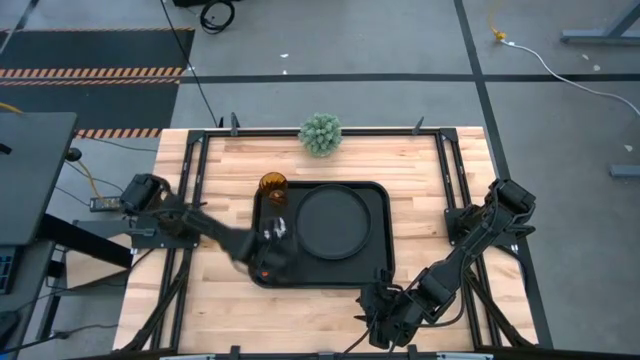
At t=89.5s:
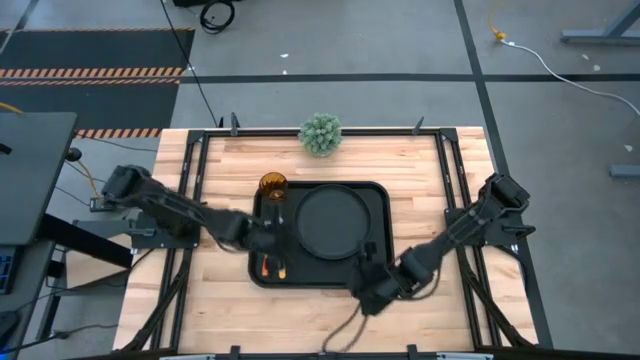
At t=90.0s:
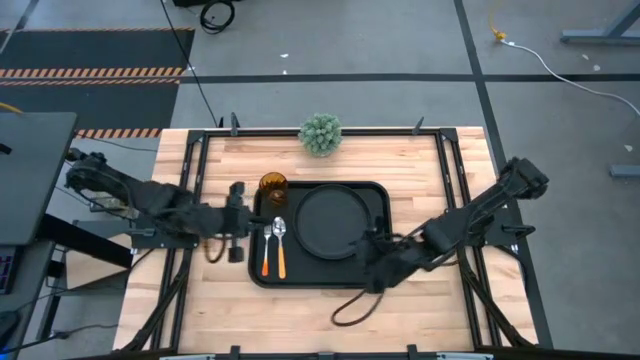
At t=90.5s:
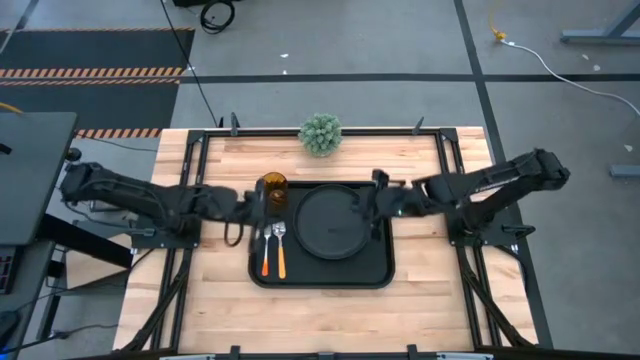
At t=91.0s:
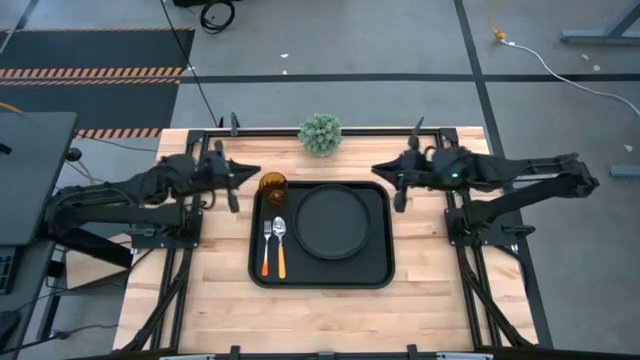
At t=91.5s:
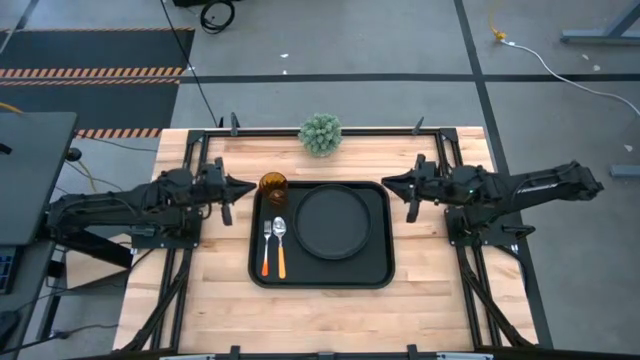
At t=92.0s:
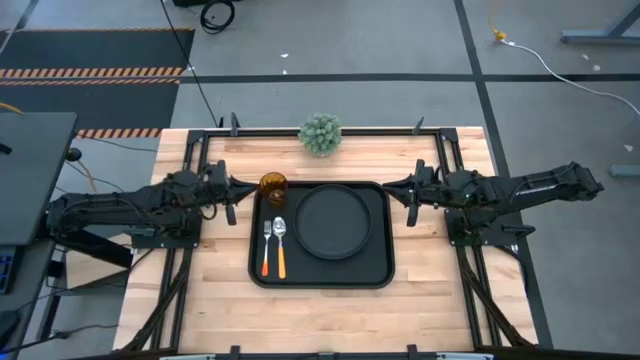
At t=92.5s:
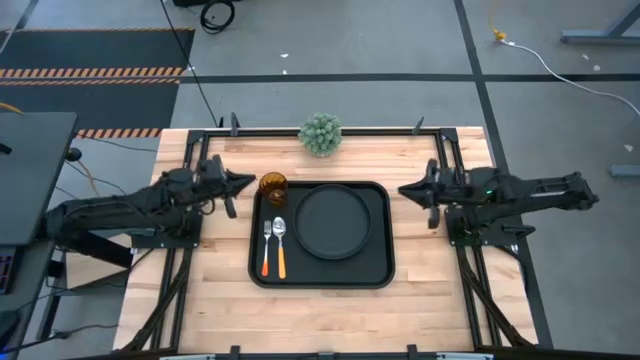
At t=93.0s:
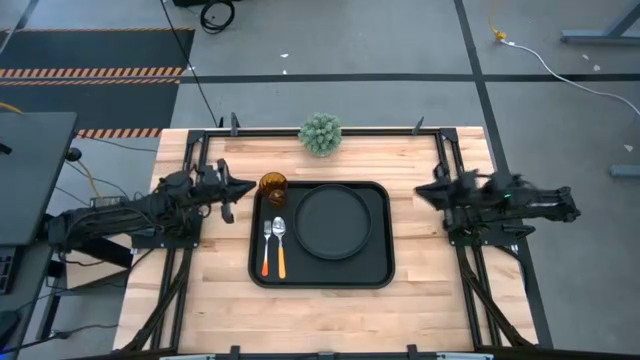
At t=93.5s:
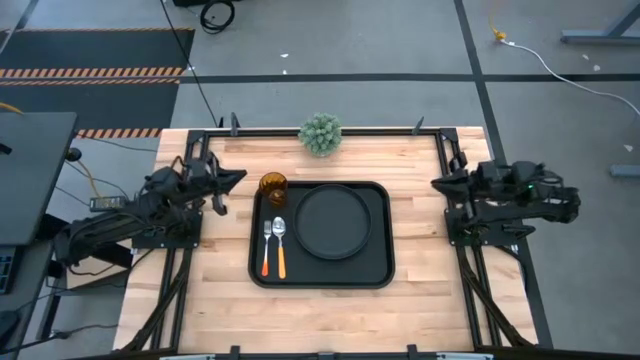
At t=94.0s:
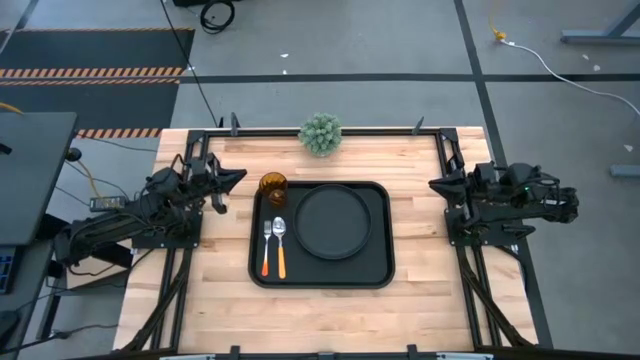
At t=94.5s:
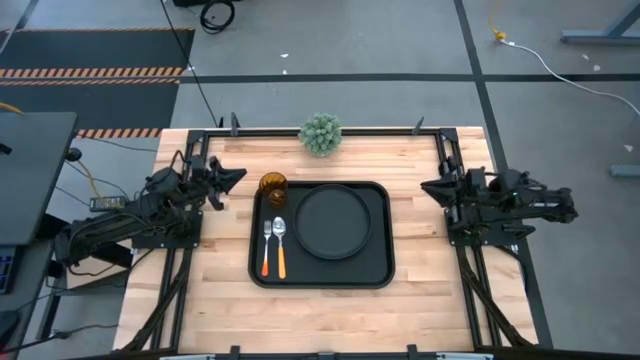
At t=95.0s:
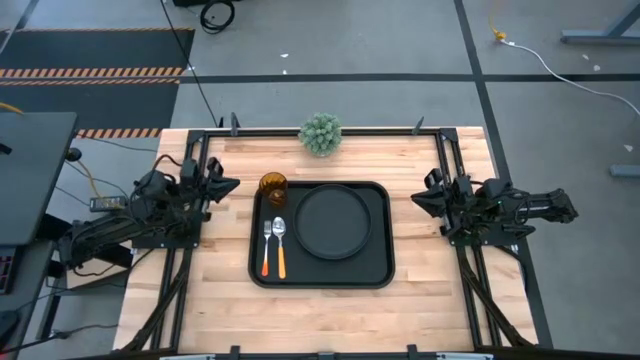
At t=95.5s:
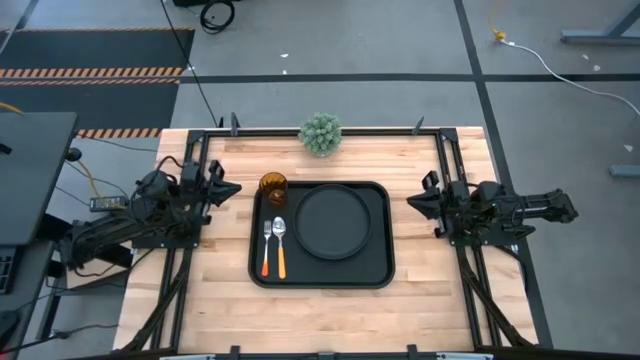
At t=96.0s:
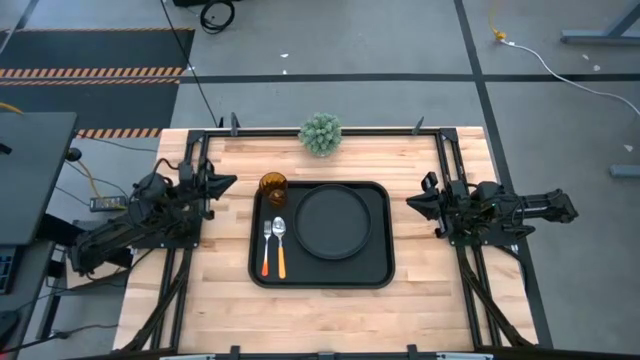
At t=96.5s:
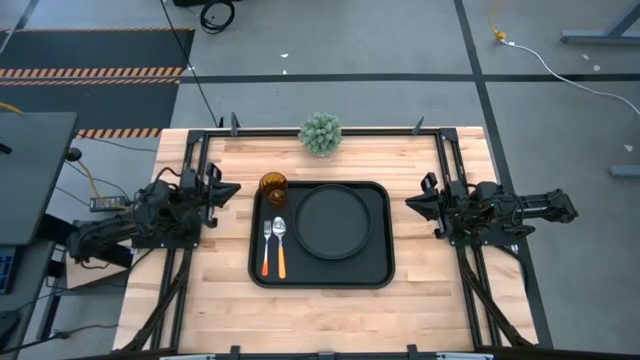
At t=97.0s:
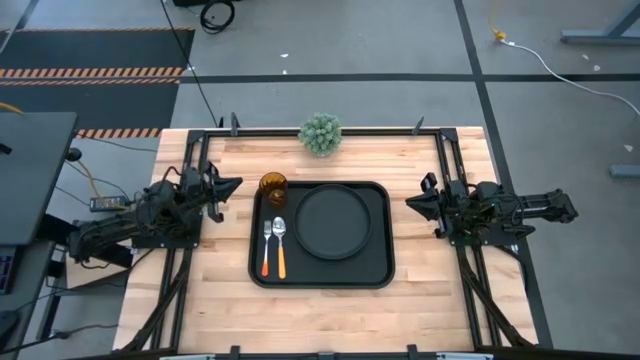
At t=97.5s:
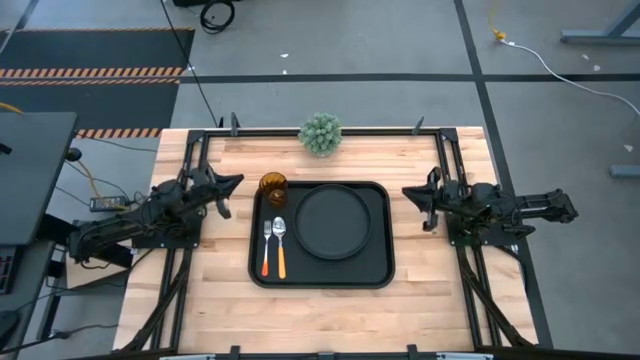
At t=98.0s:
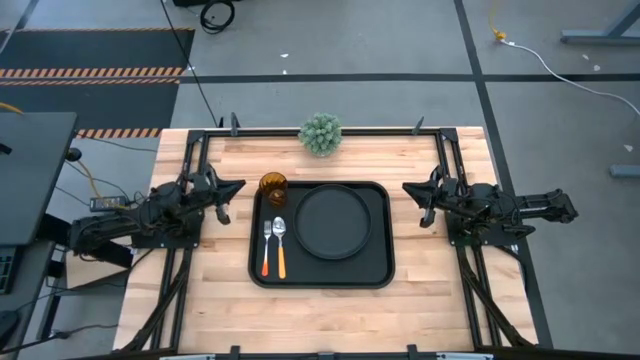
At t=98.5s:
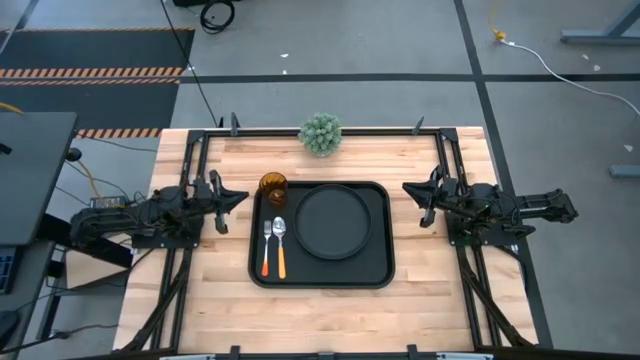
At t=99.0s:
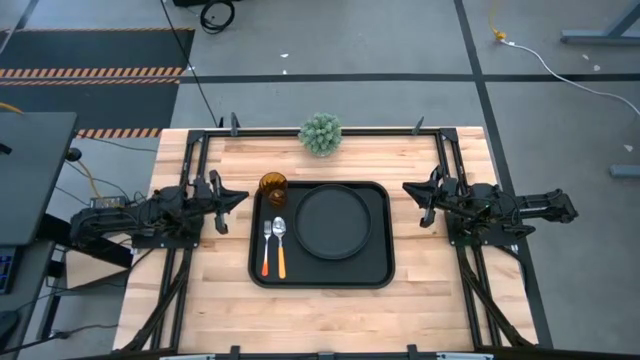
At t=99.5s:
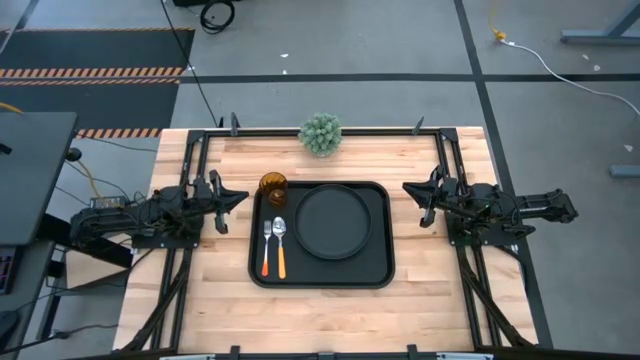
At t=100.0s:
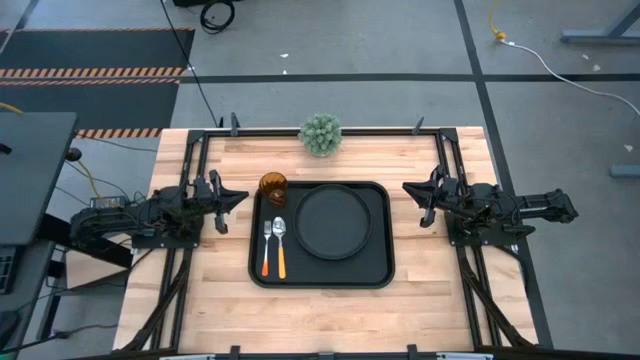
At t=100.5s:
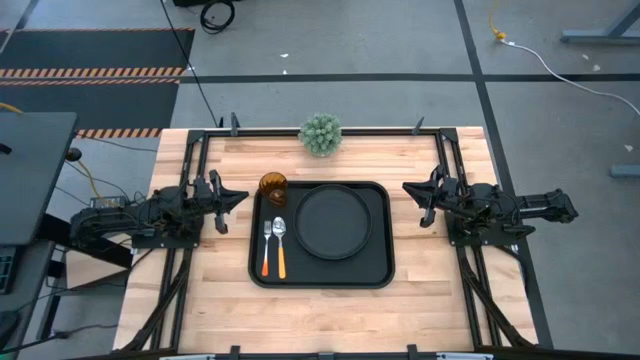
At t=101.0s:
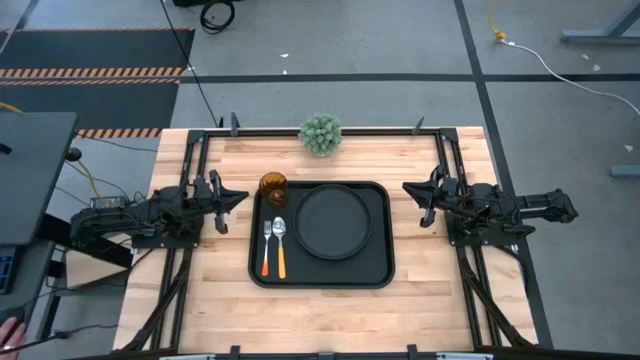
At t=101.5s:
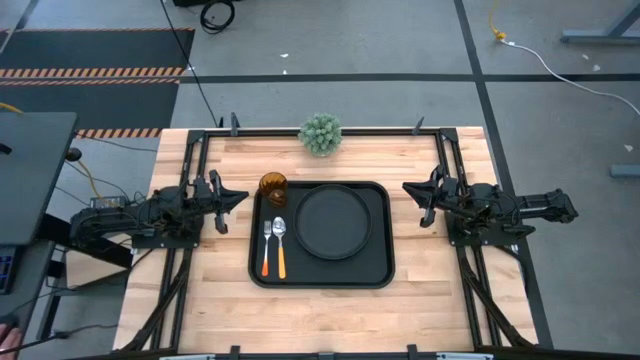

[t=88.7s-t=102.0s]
Task: Pick and place plate/cup/fork/spoon on tray
Return to Home Position

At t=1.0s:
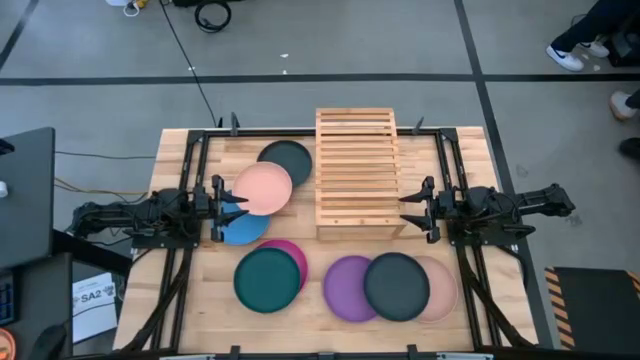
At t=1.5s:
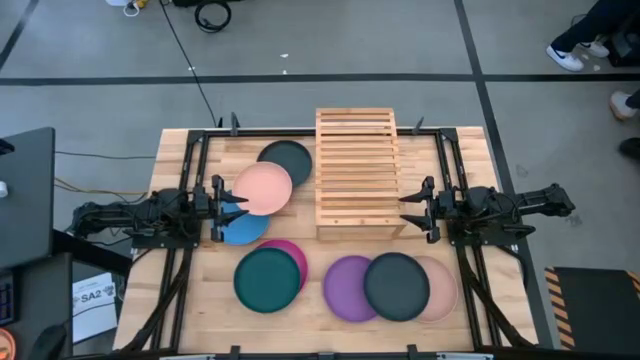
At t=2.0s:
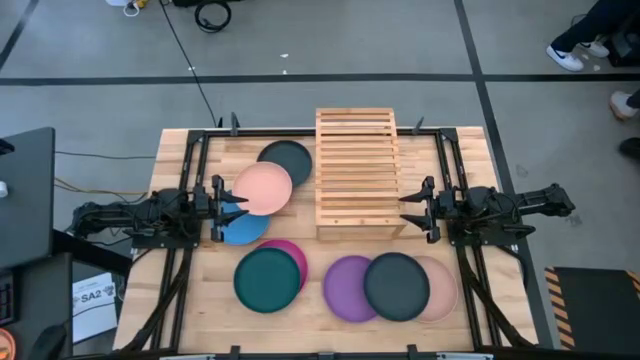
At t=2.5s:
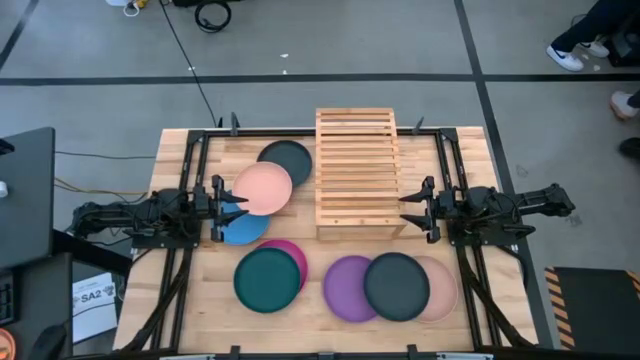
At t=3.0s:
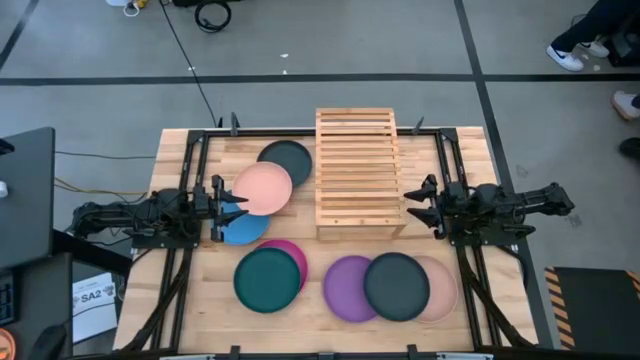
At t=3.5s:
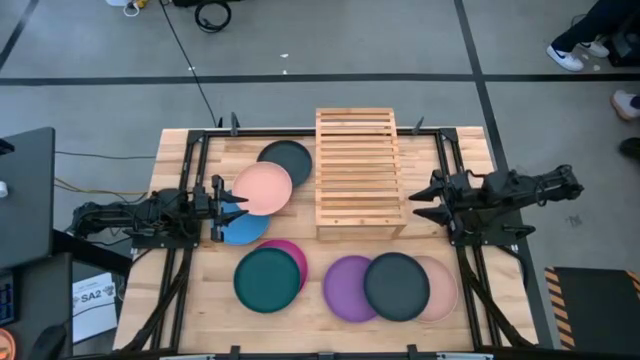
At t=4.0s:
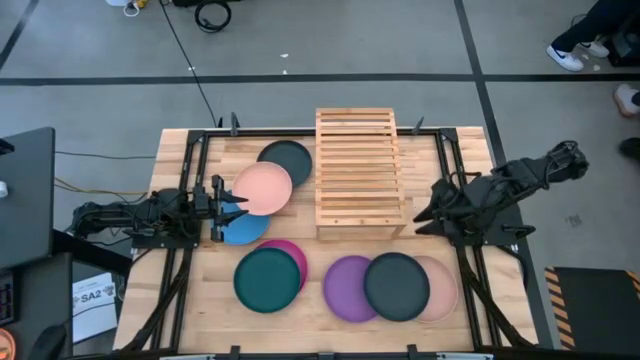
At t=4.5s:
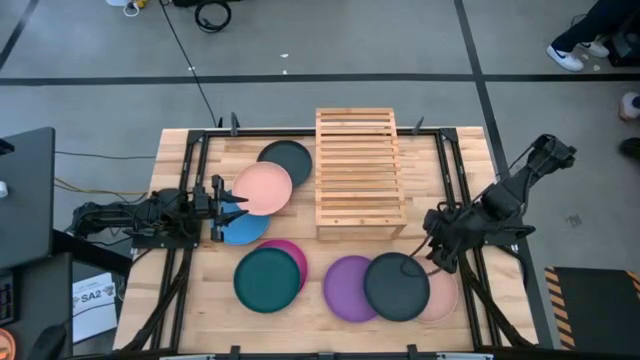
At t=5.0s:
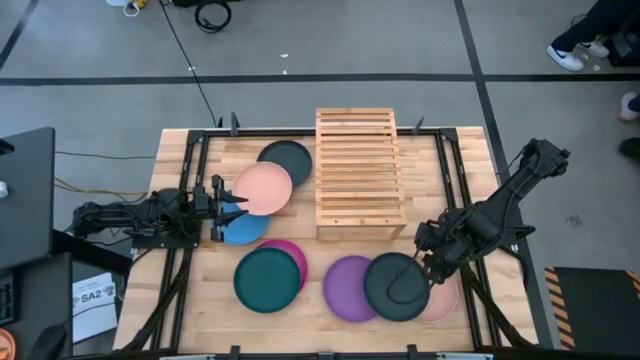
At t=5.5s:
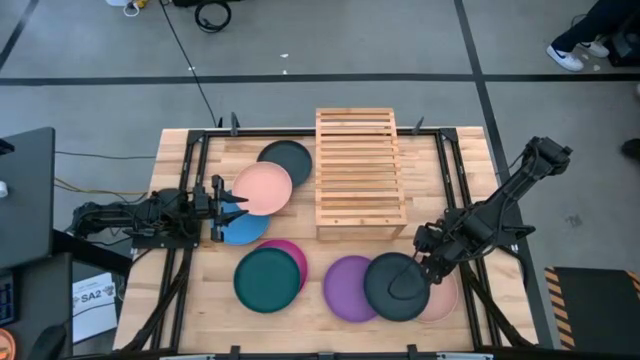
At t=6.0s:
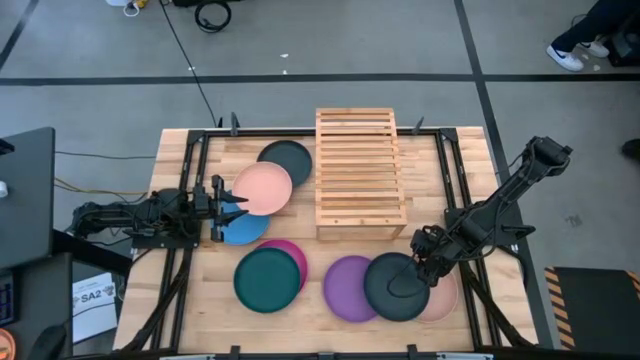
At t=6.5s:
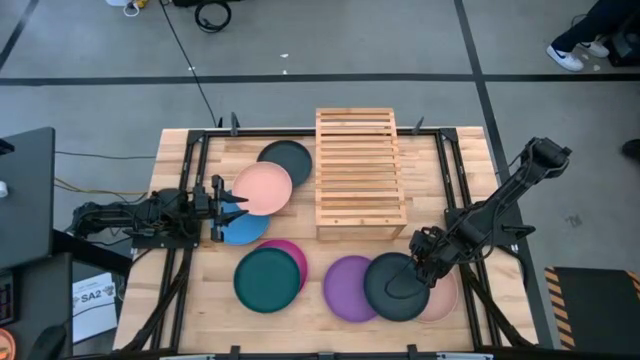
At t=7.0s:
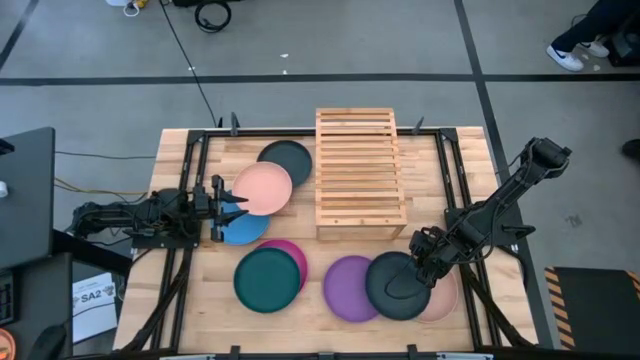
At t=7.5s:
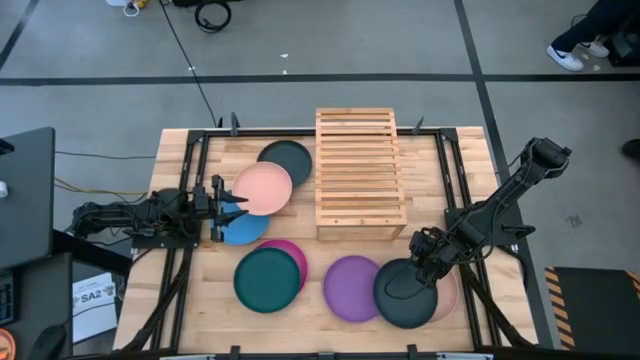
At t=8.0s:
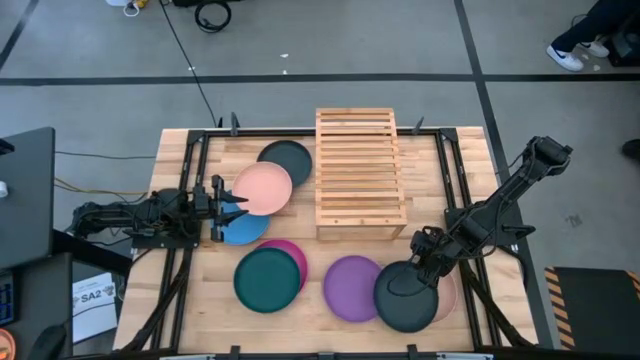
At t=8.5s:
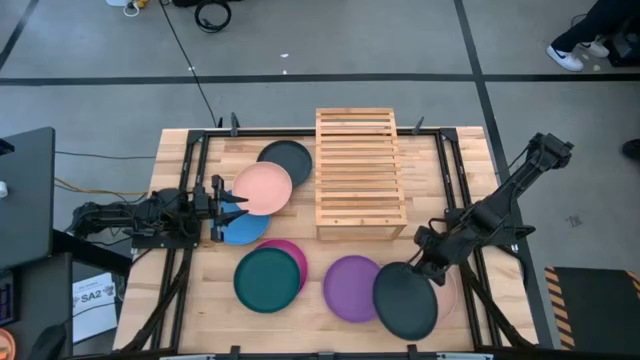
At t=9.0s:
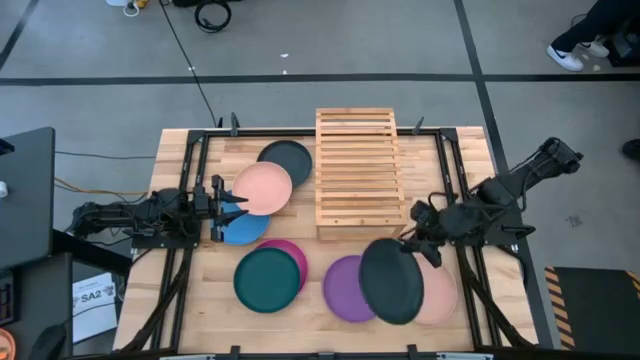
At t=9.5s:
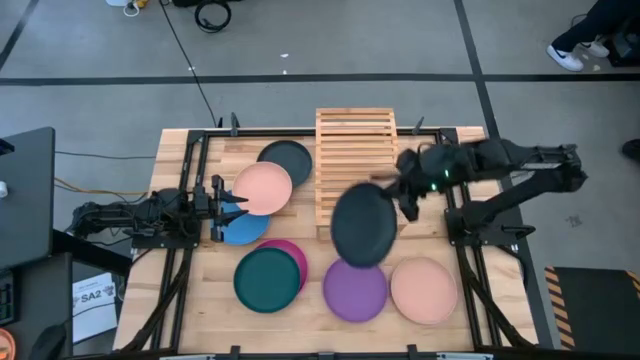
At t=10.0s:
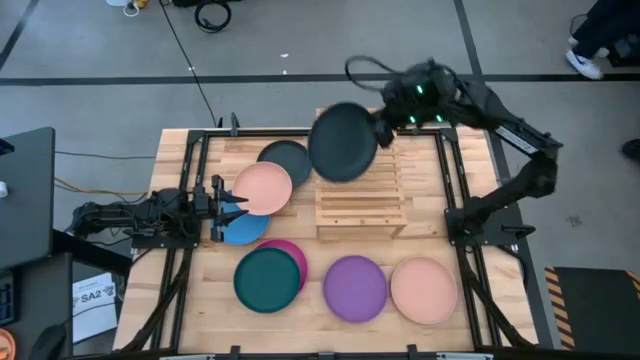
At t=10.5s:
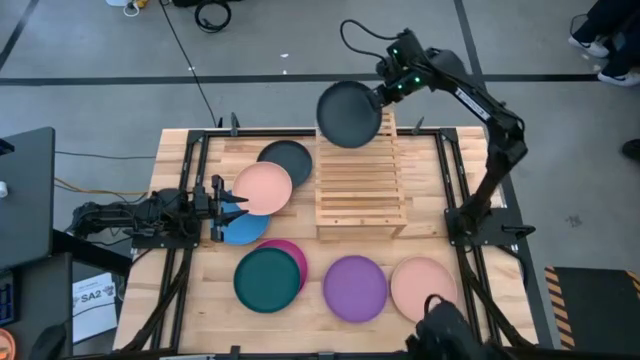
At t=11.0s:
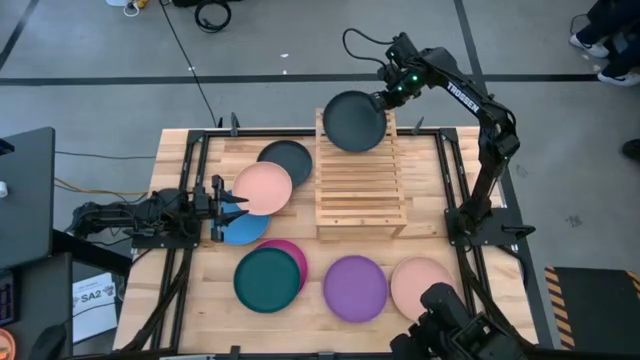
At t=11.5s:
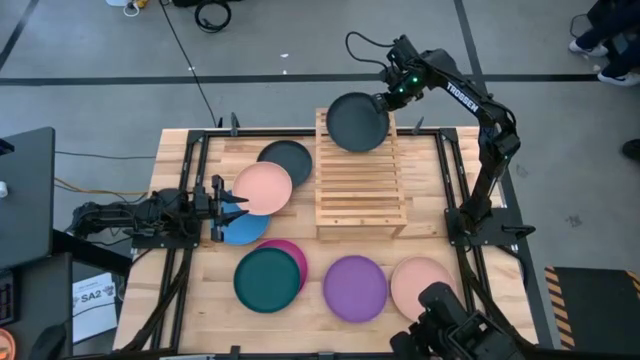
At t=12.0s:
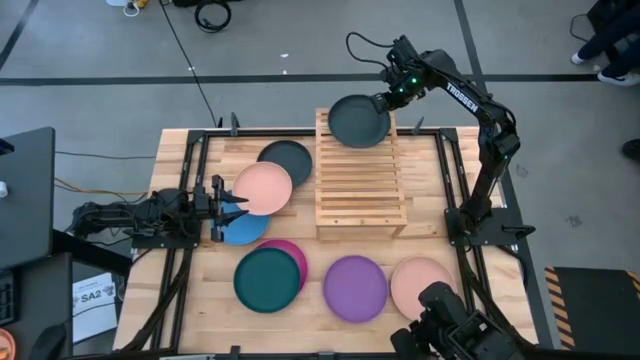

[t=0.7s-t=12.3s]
Task: Place and stack plates onto a shelf
Put the bottom black plate on the shelf
